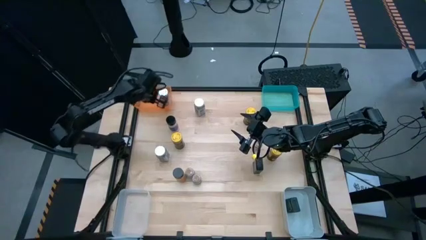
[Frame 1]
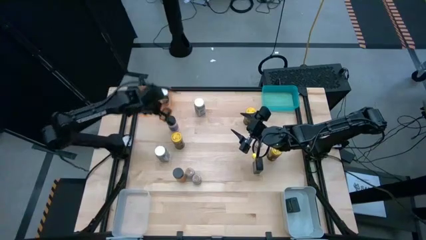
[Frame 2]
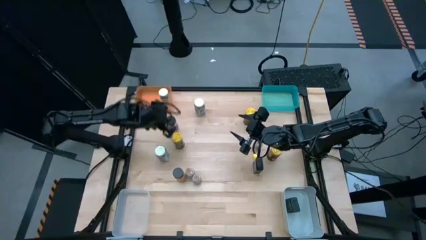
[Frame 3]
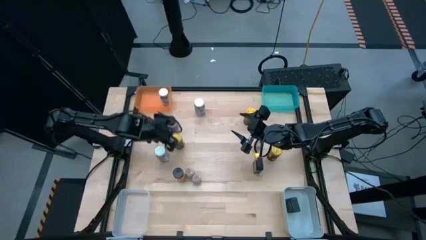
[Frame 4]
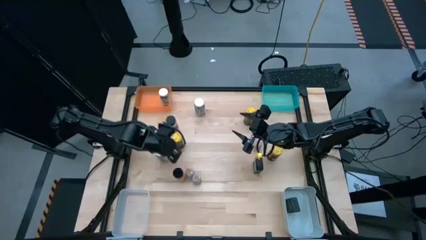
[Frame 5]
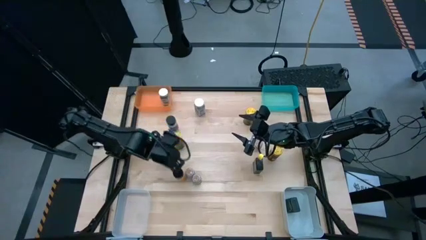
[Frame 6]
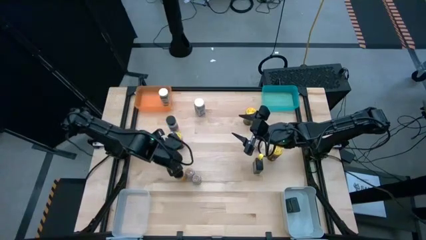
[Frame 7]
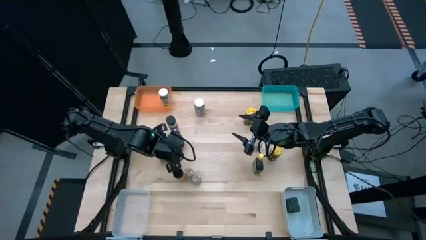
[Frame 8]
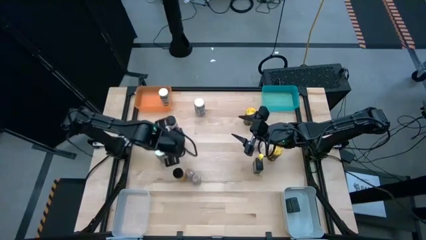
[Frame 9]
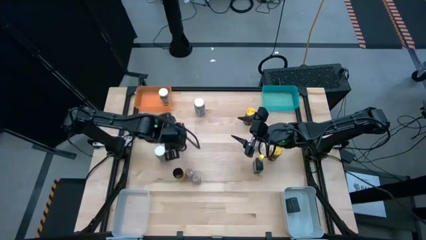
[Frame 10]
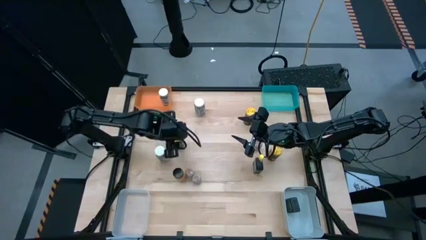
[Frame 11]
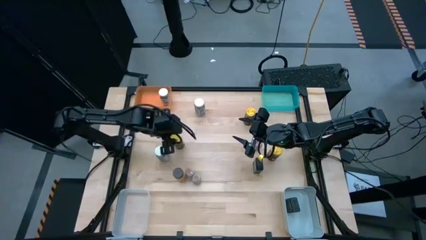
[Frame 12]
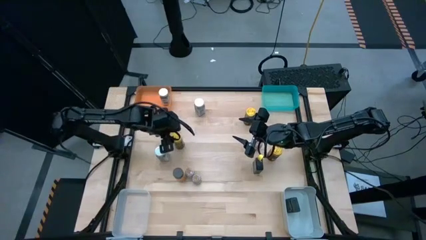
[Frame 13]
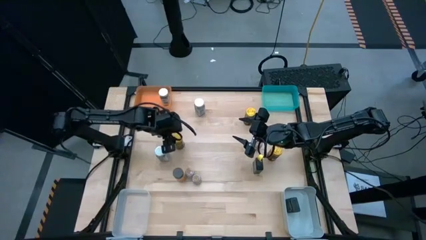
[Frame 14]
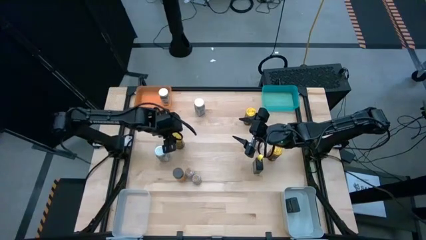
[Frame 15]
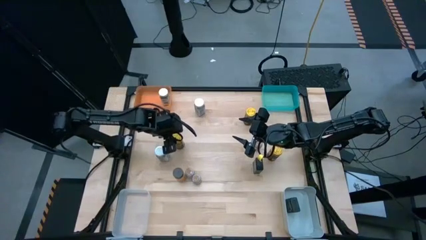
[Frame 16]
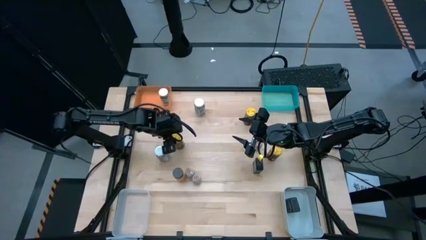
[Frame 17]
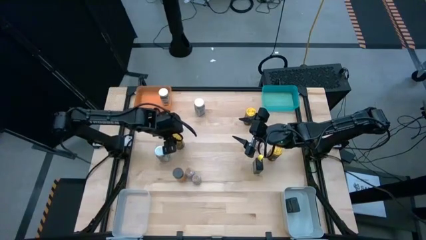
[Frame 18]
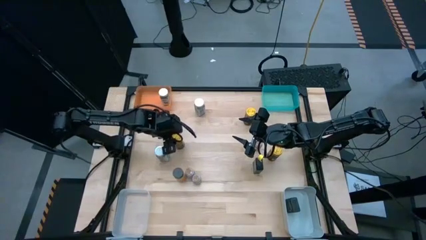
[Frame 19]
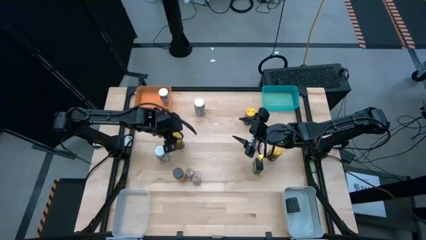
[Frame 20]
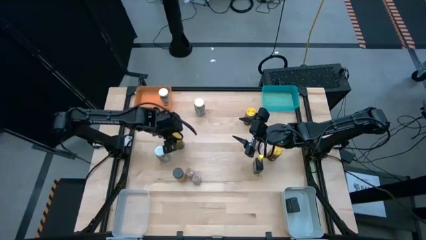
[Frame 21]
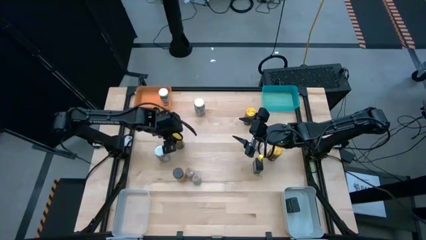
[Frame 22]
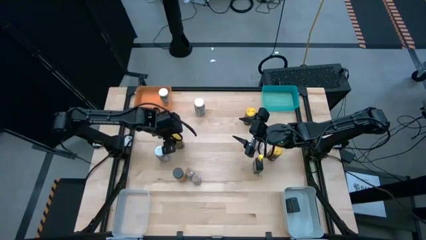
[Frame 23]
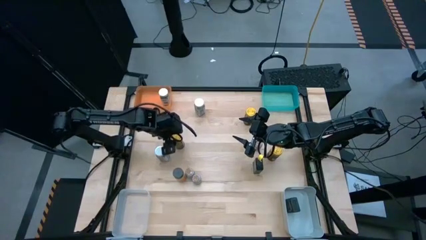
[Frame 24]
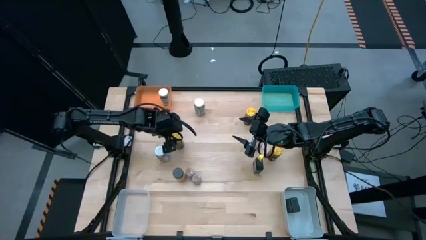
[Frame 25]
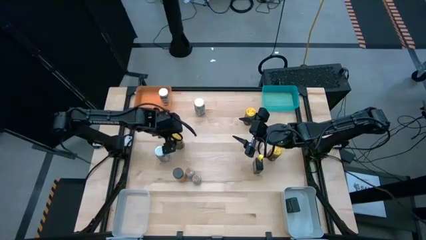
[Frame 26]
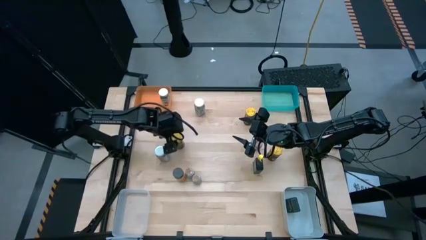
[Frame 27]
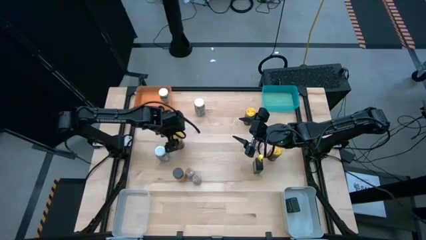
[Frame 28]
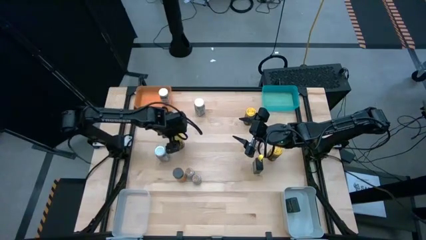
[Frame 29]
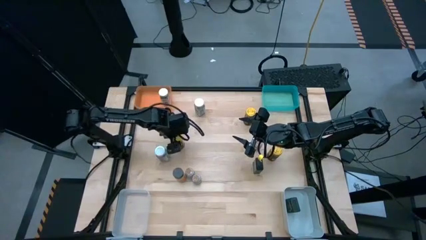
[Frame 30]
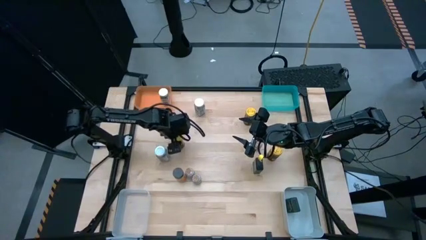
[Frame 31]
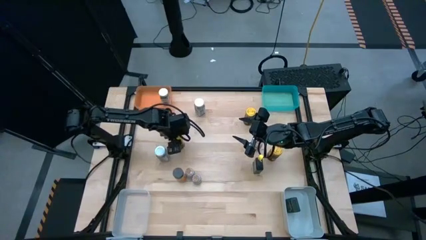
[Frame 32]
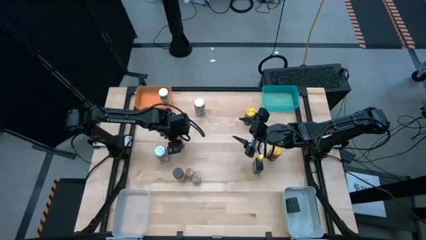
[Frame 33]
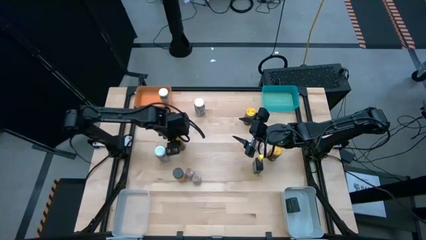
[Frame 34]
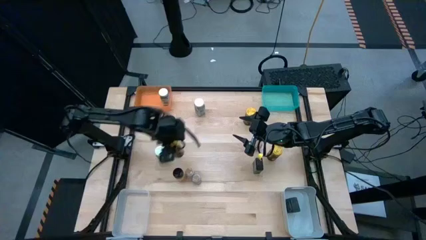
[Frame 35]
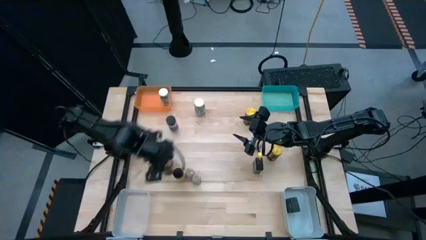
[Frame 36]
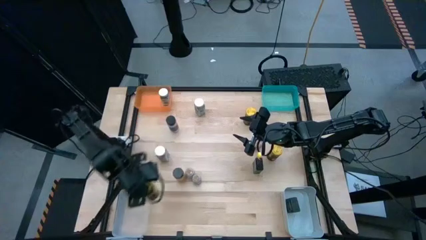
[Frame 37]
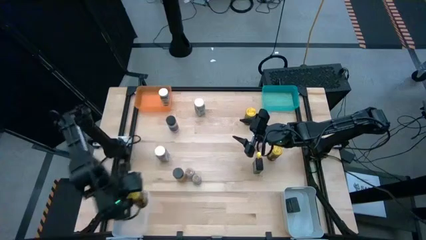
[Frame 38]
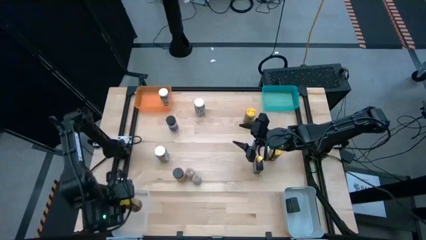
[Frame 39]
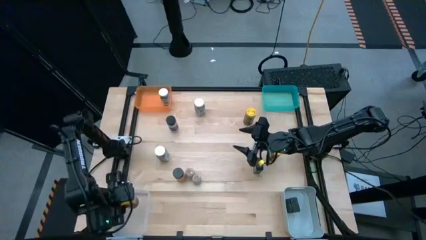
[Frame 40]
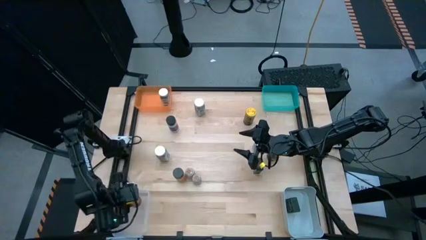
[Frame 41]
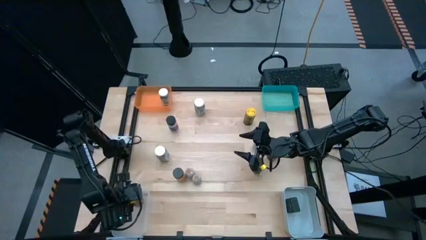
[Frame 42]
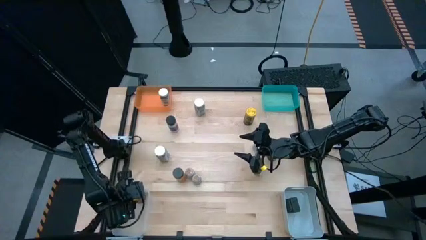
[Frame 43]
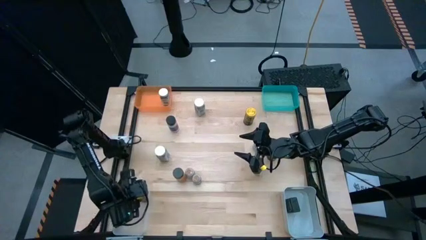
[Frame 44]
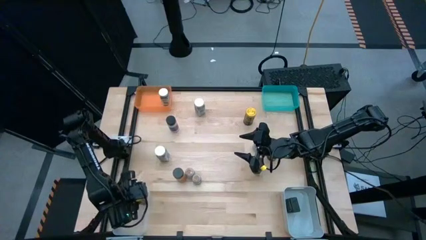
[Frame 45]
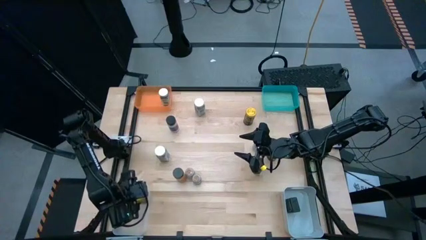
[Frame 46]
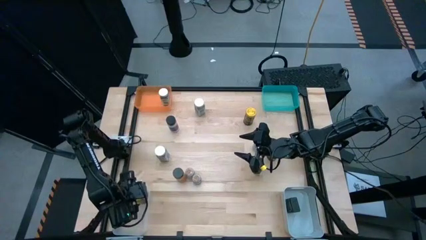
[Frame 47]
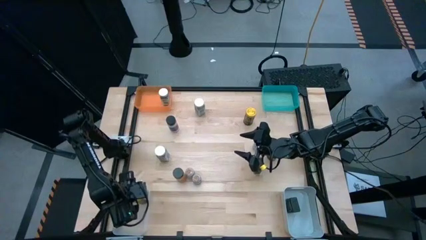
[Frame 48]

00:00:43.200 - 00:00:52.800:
Task: Sort spices by type
Put the bottom left yellow seasoning bottle into the transparent bin

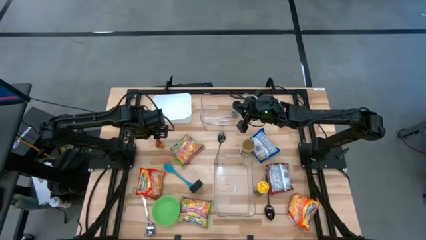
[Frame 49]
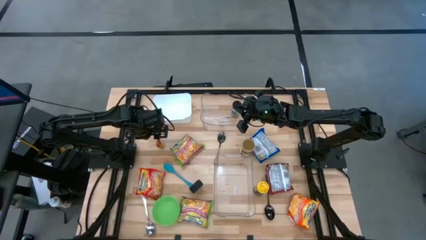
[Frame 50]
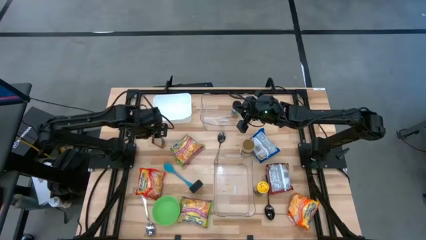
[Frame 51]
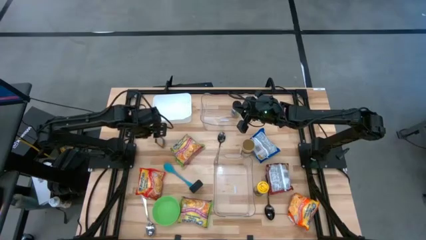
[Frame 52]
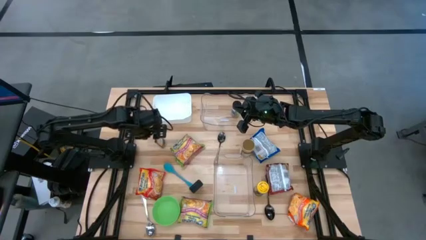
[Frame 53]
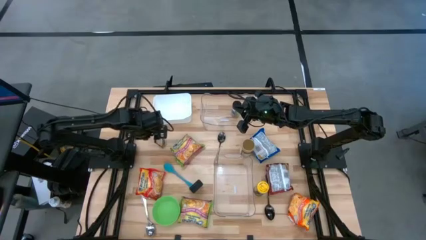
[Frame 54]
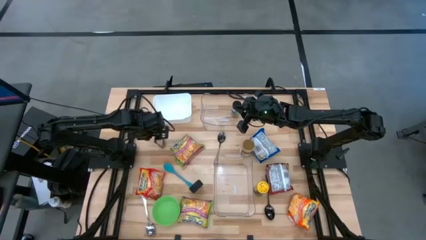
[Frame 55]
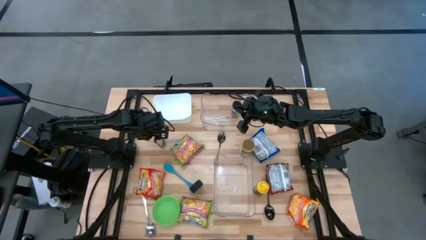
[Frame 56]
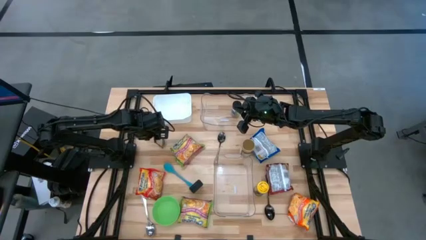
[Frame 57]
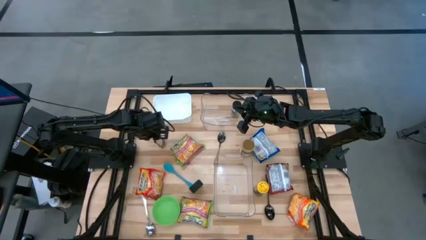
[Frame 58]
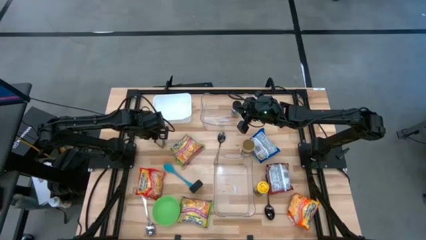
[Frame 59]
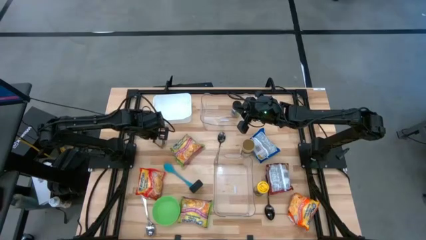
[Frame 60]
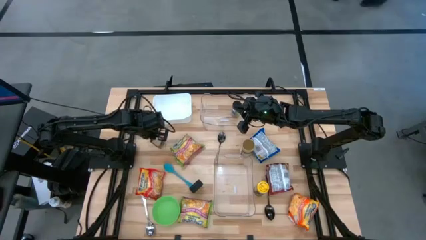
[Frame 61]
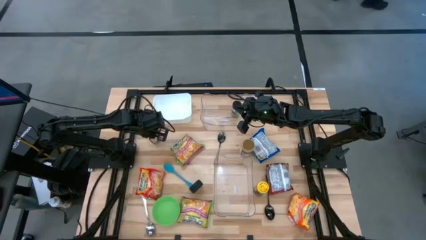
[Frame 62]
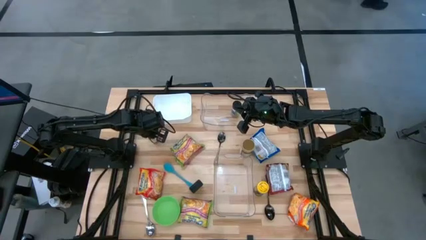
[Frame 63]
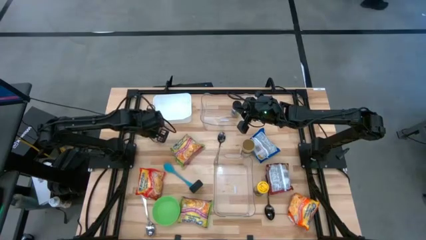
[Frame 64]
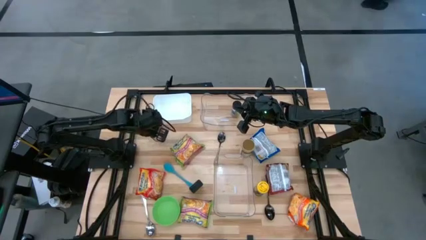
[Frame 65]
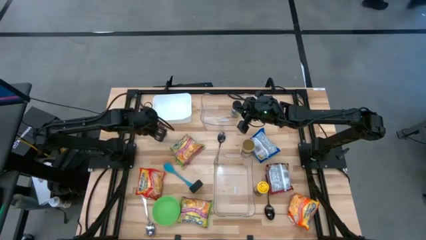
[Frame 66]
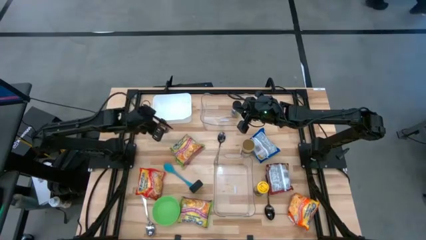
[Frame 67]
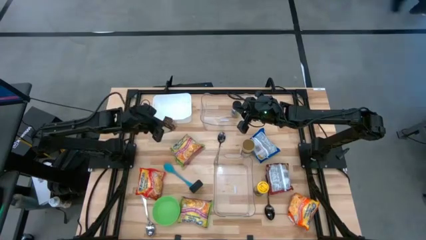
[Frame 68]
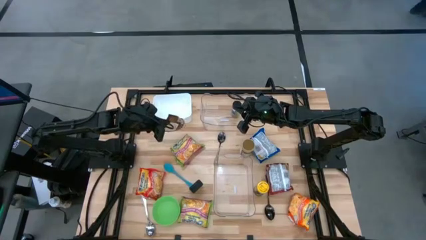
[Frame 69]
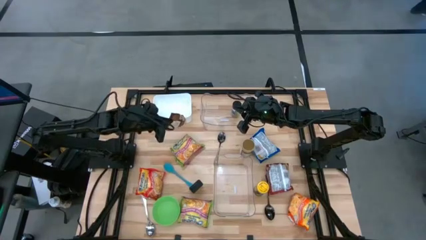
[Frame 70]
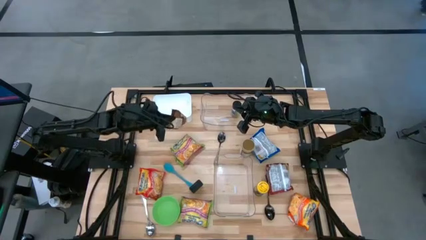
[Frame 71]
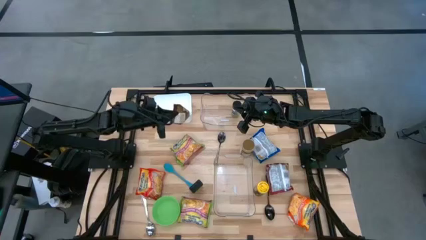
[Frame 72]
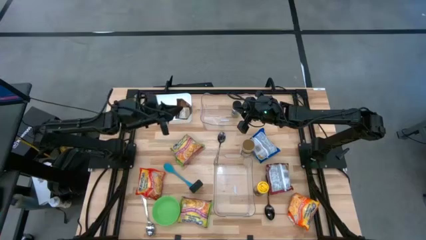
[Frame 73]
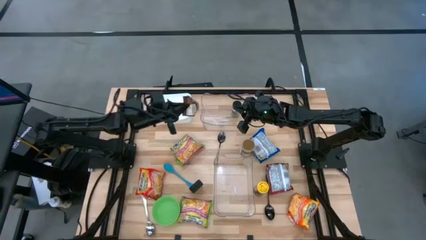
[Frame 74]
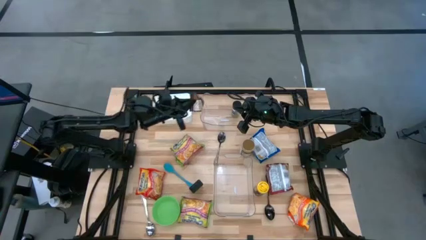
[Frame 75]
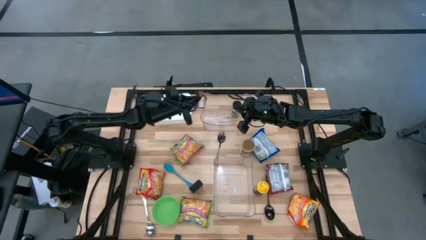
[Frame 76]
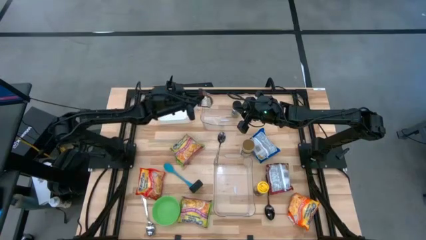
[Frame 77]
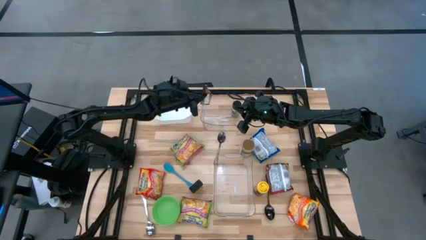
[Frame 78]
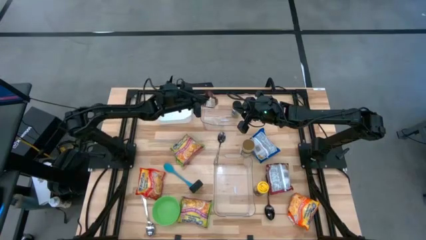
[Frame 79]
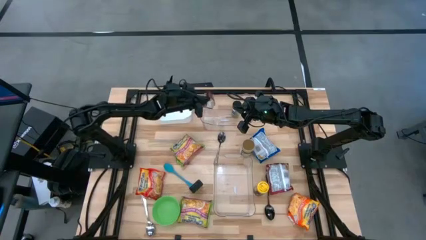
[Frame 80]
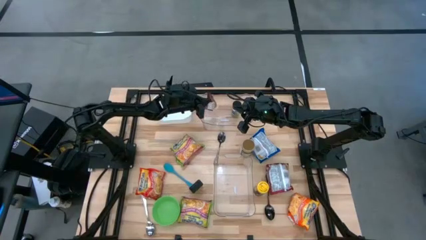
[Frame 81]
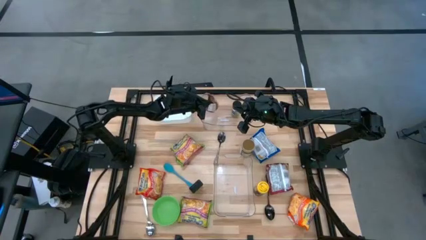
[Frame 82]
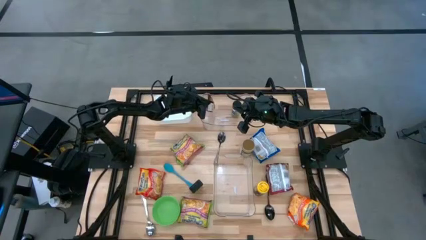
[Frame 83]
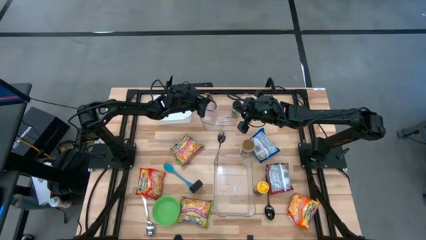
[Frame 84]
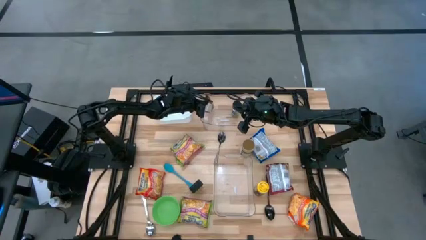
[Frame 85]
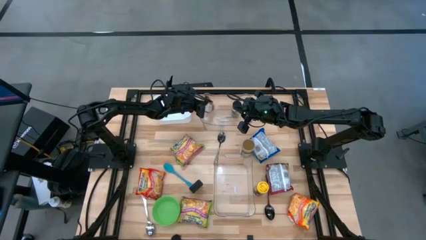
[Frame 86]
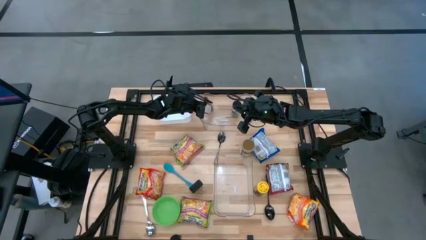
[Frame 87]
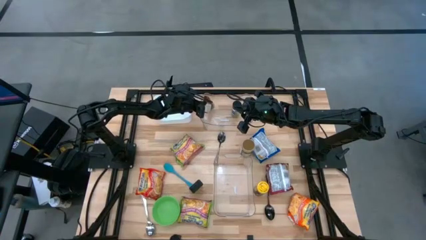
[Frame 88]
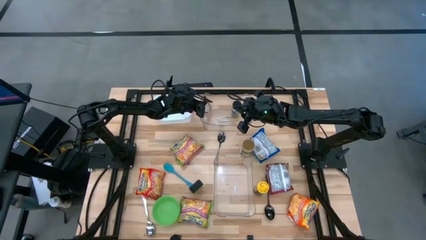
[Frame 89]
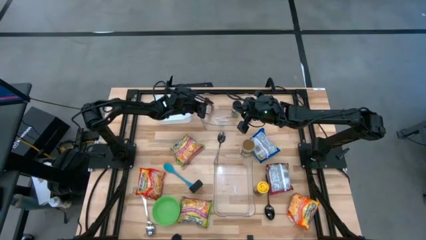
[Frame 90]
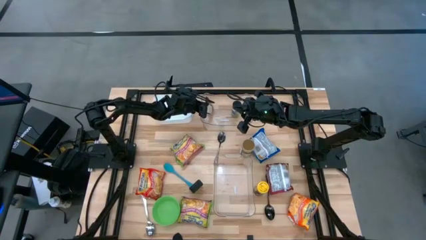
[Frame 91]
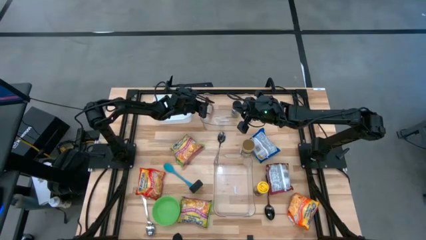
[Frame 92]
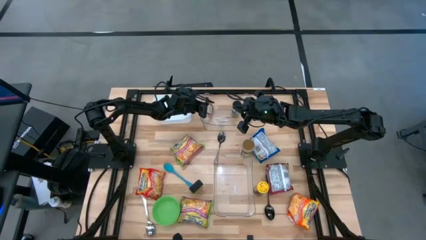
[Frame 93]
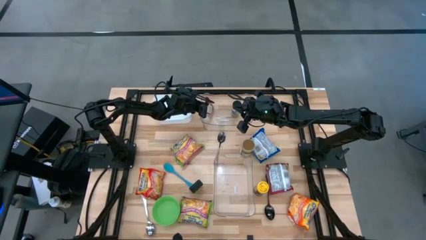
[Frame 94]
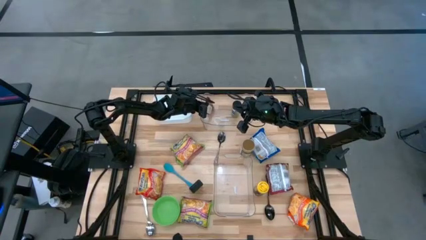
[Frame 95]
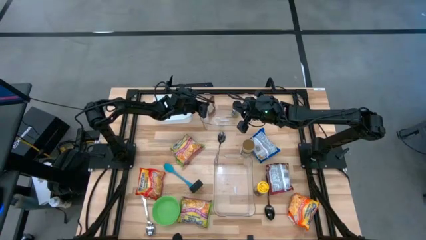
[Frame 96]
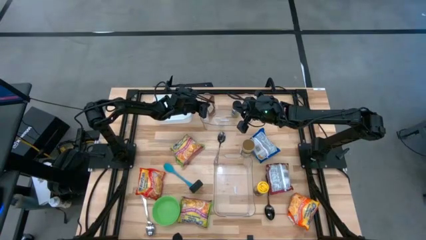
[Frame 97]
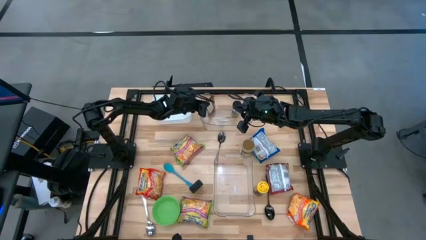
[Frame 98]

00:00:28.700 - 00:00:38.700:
Task: Pick & Place Food Item
Put the orange seasoning pack into the top transparent bin
